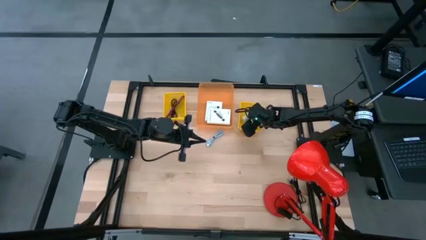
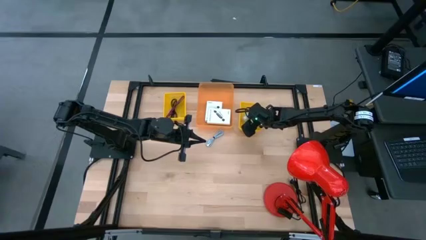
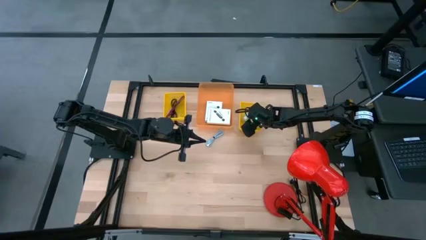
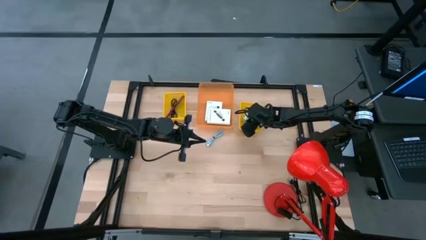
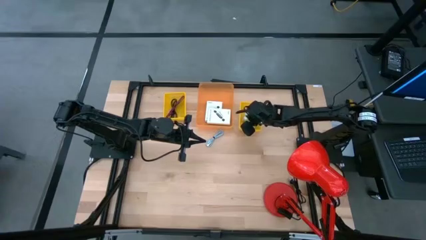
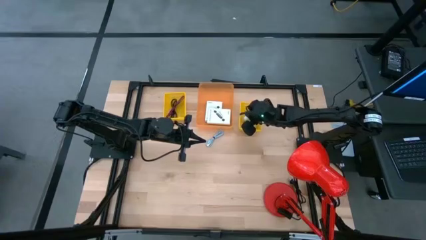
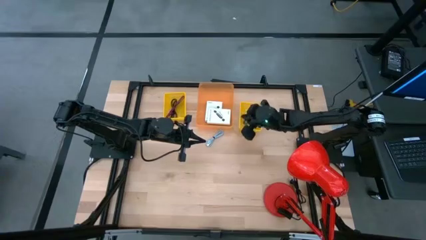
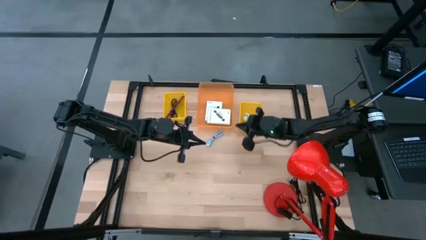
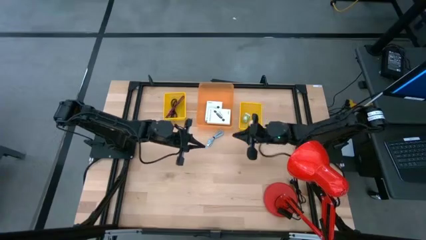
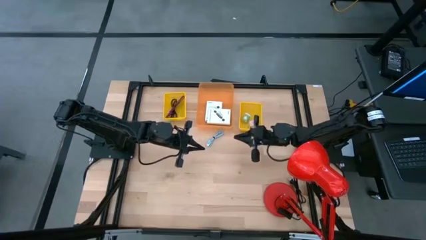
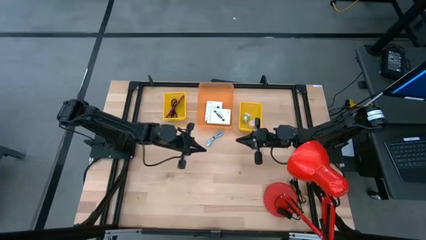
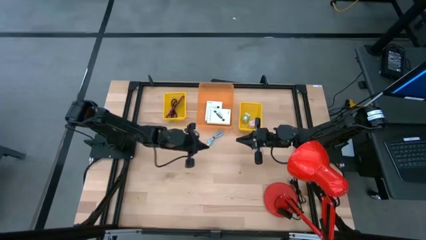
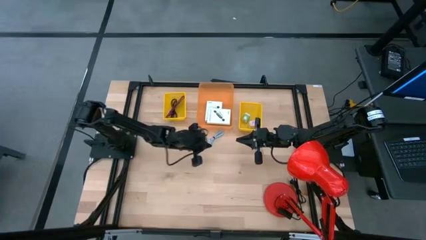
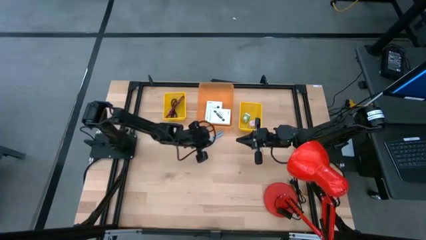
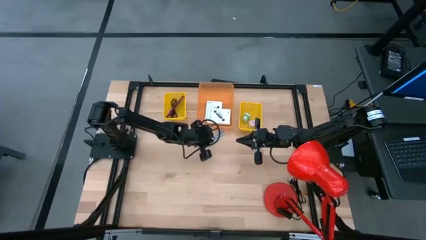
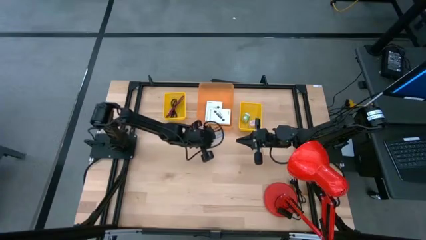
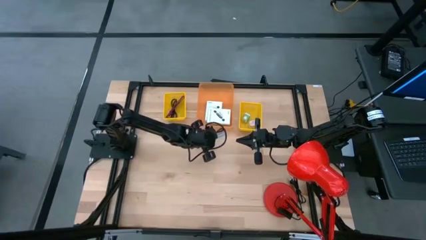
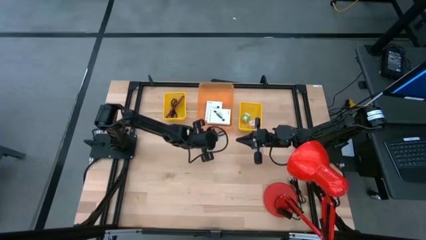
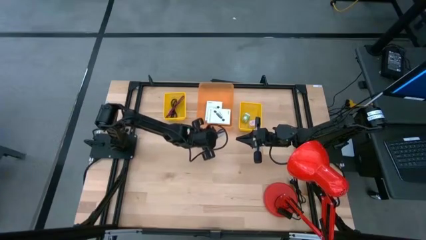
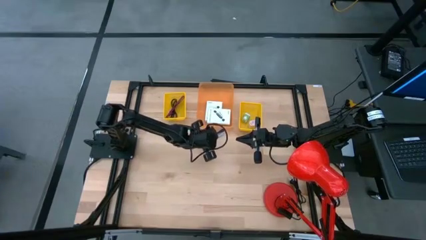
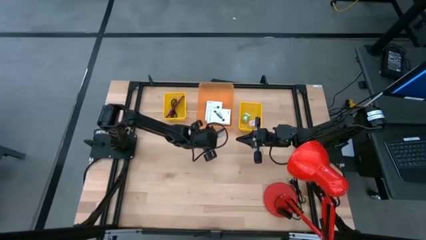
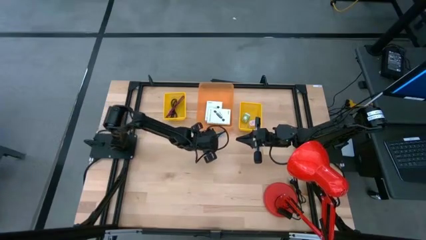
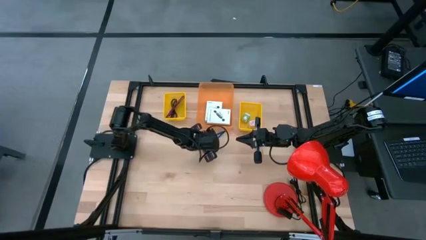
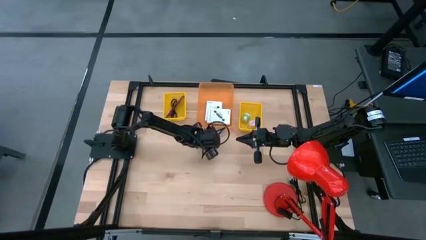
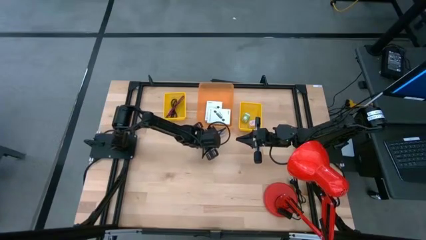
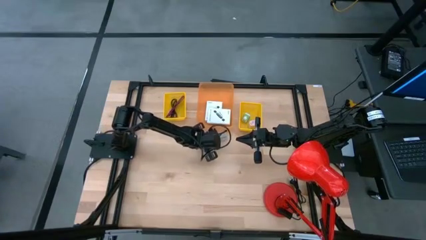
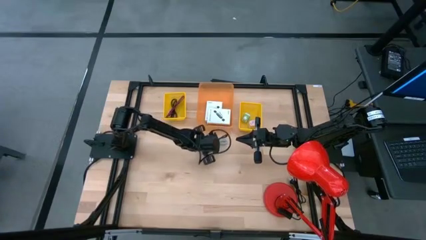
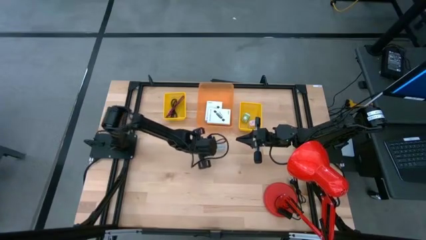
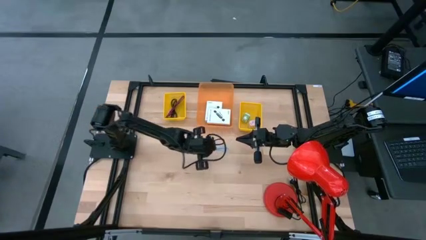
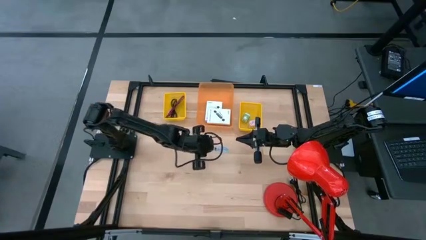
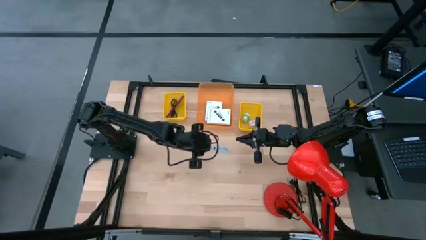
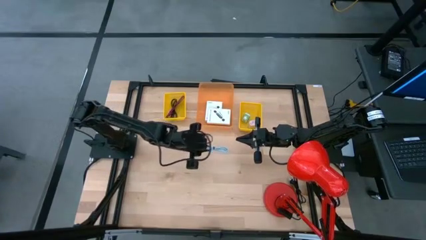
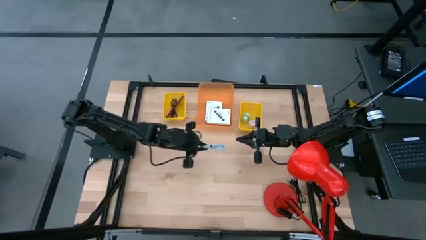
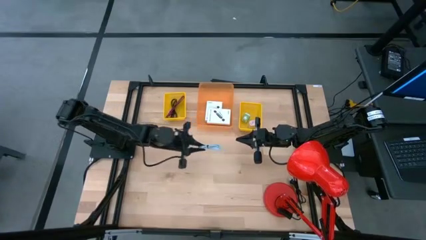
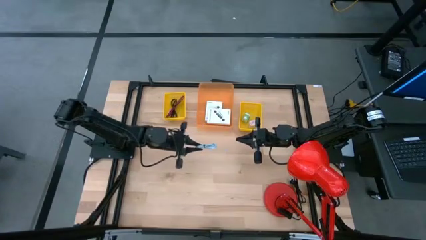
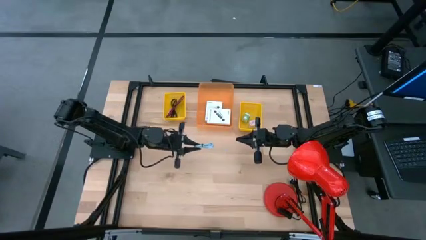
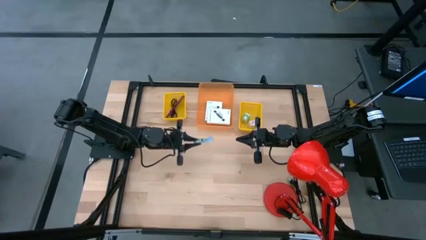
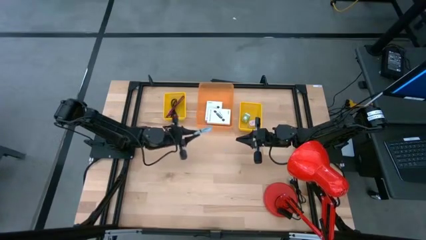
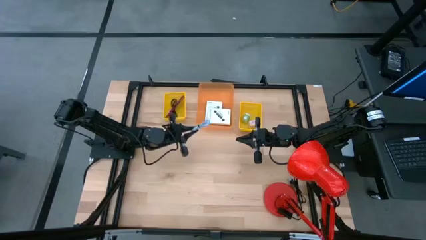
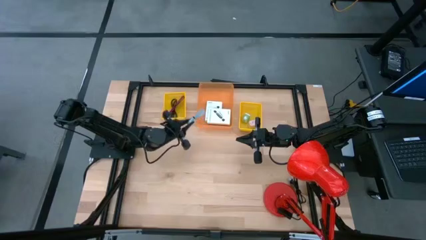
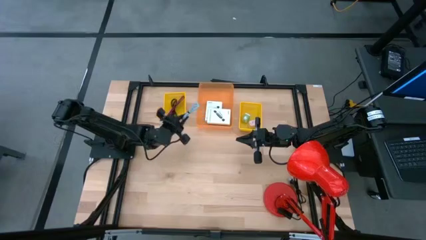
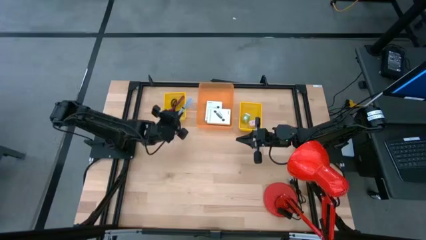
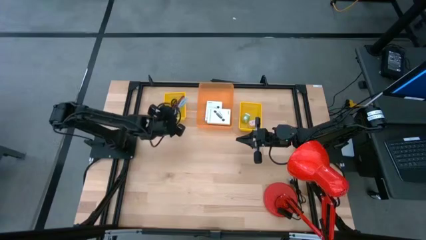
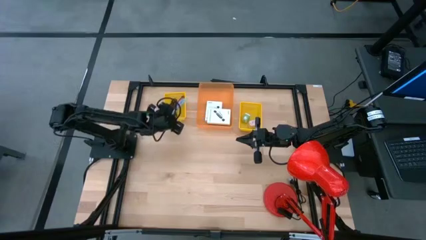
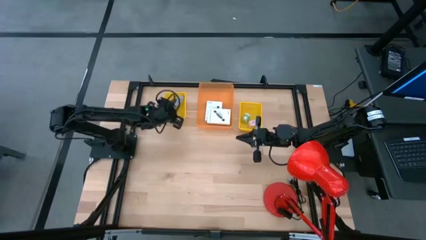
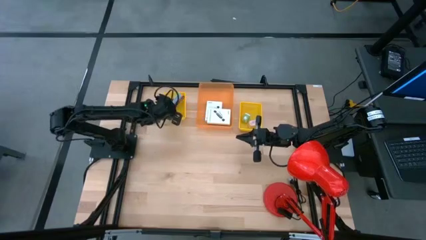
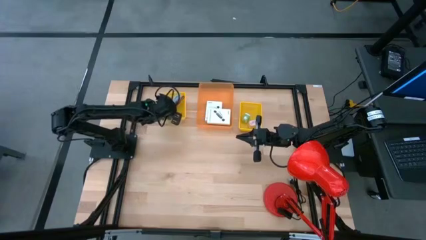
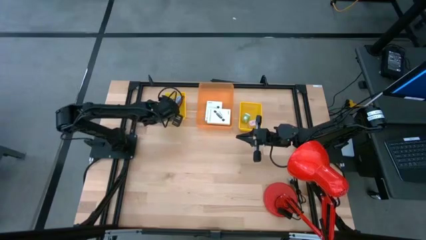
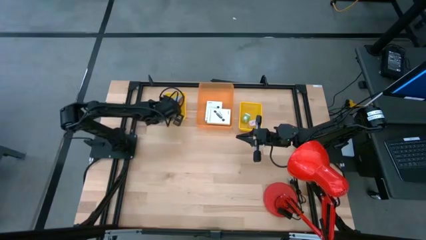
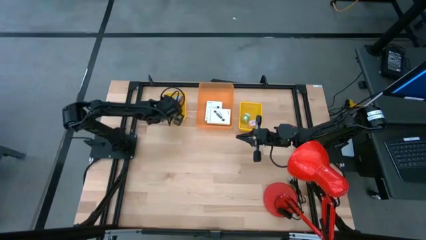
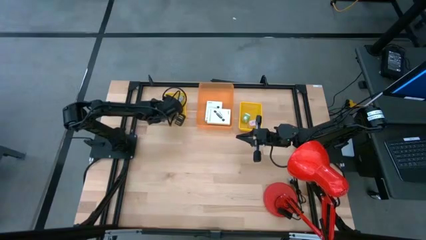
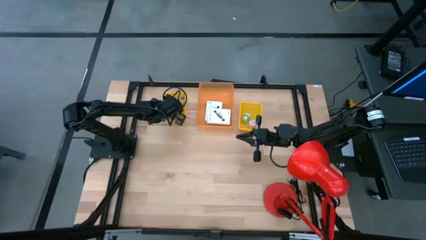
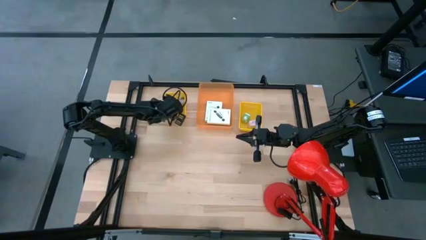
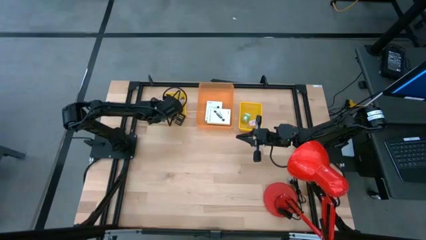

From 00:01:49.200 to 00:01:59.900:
Task: Pick and place items into bin
Put the blue charger cable into the left yellow bin

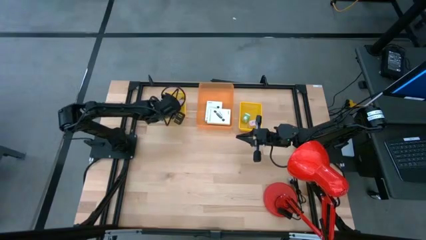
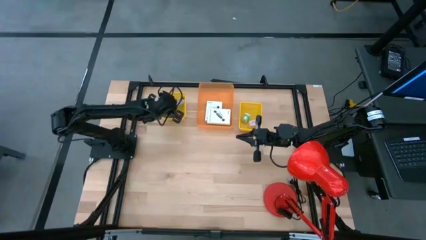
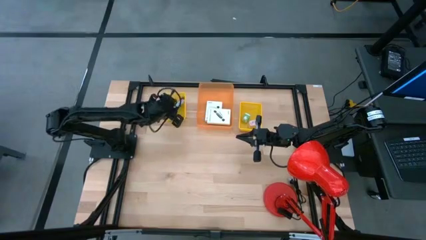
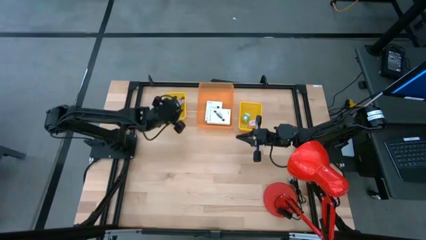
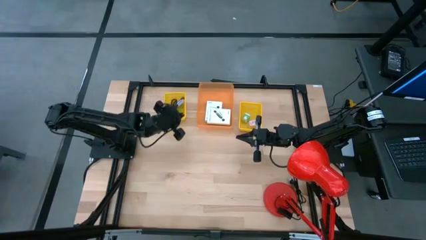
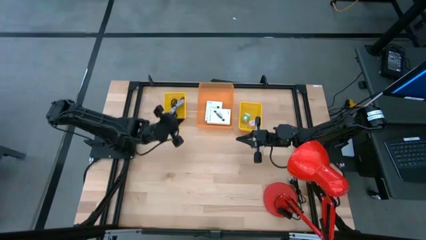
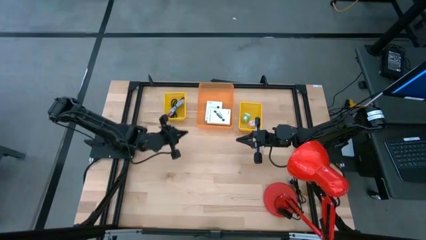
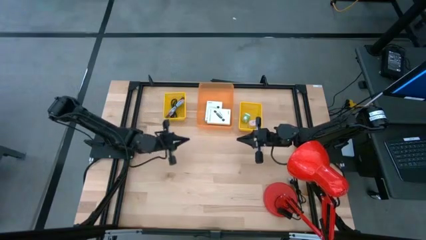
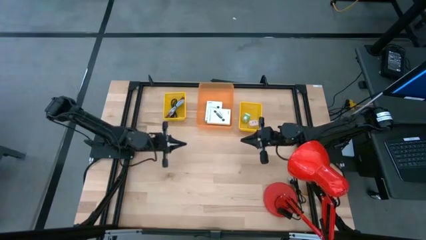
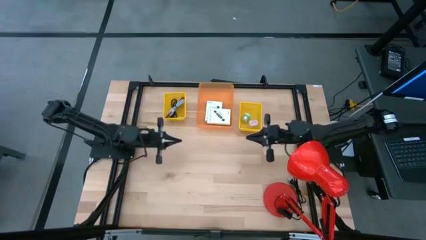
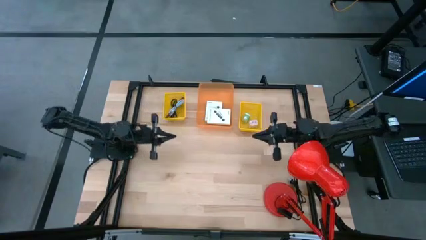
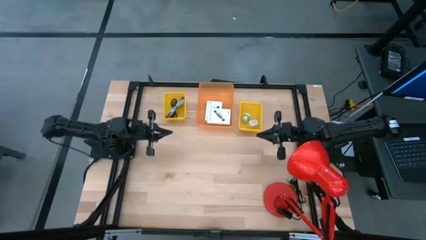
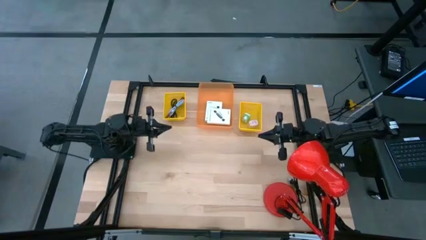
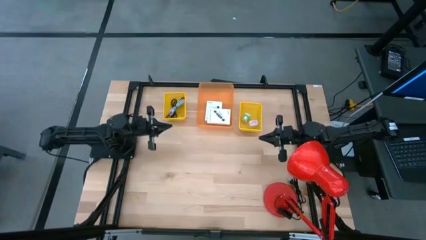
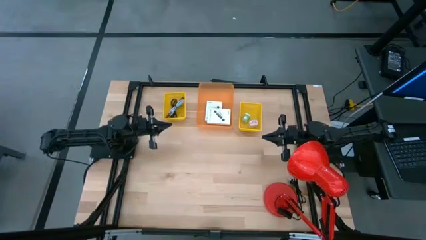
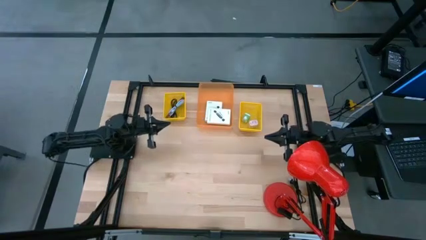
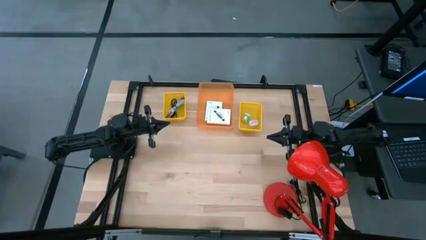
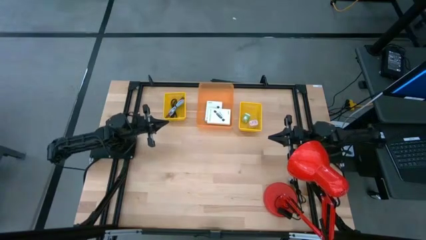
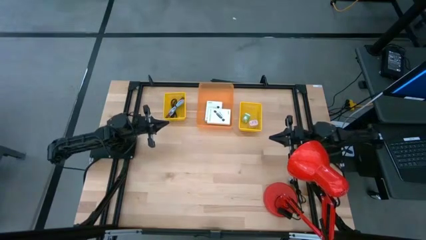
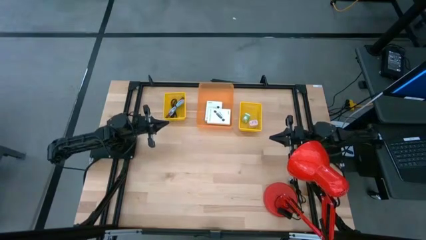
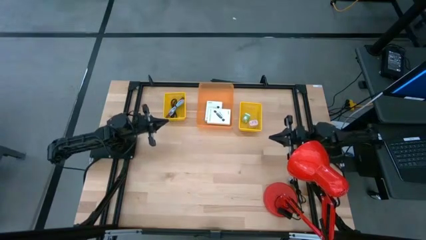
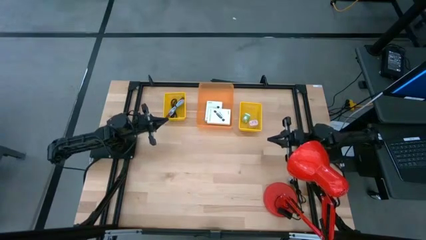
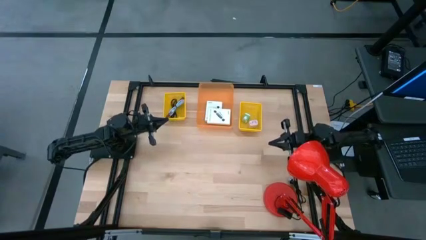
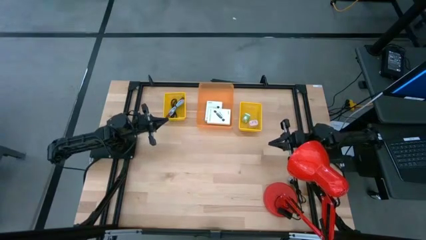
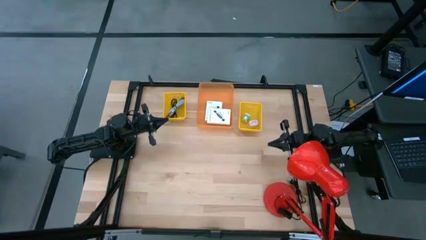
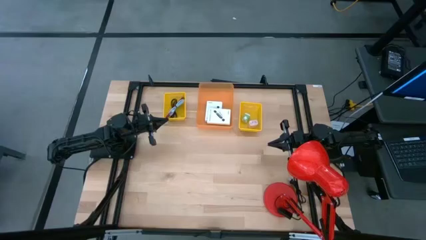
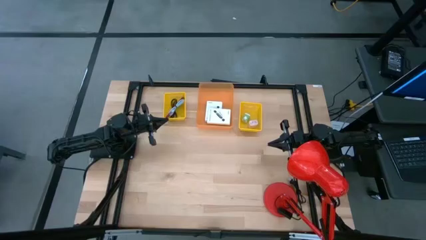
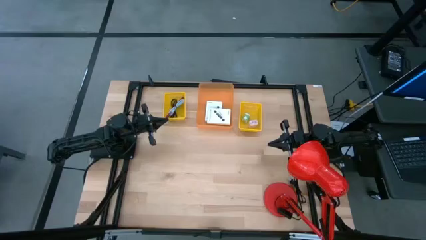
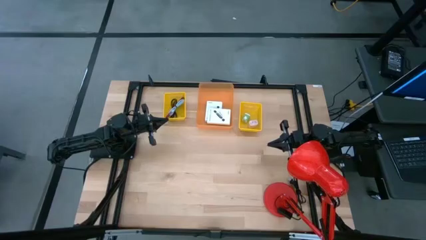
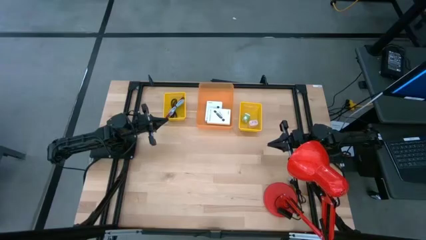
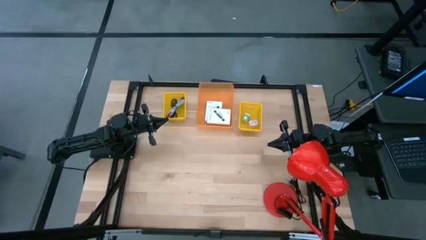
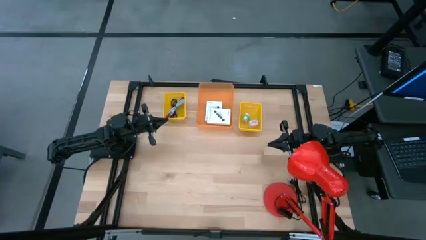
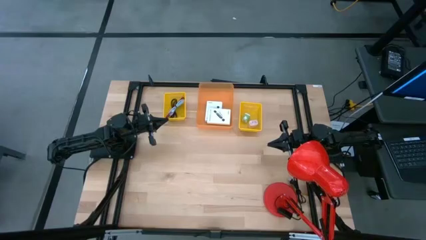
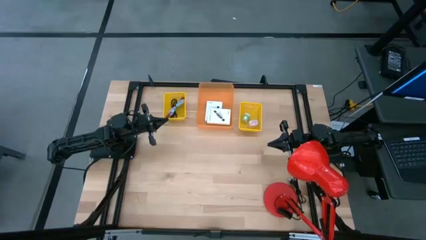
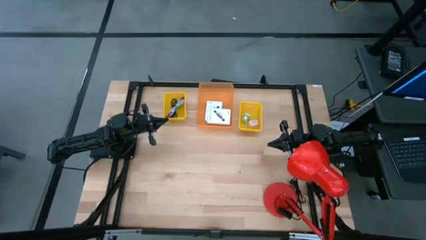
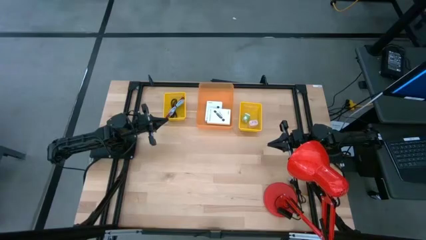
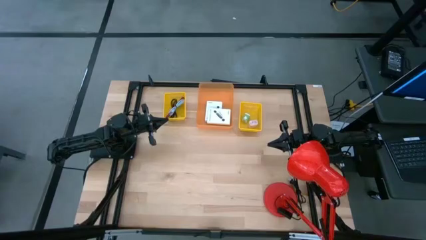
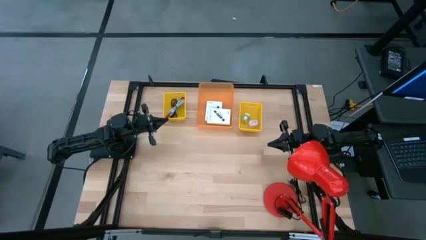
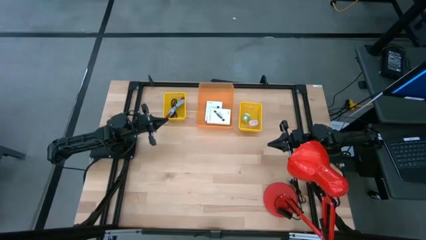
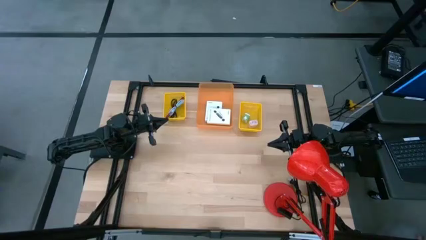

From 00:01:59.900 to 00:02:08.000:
Return to Home Position
